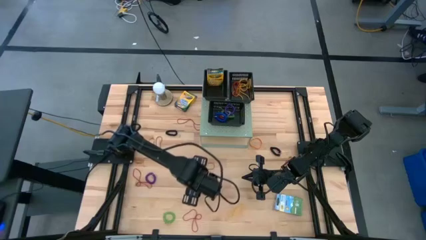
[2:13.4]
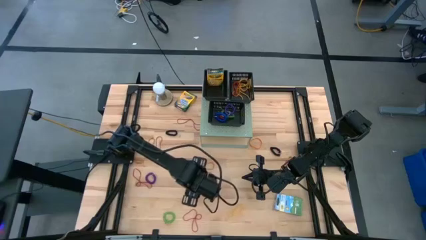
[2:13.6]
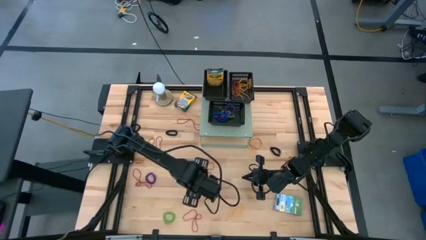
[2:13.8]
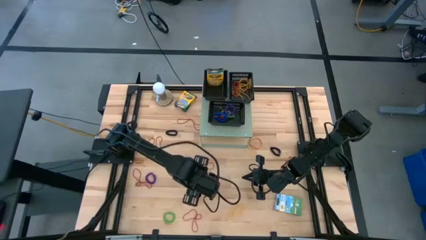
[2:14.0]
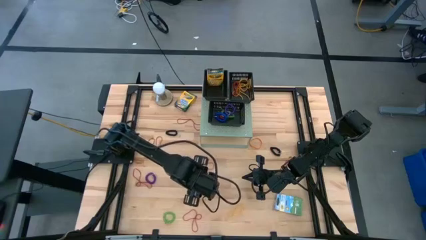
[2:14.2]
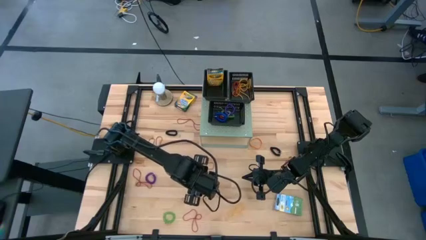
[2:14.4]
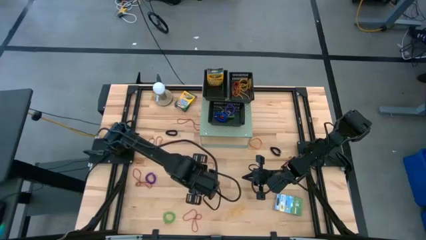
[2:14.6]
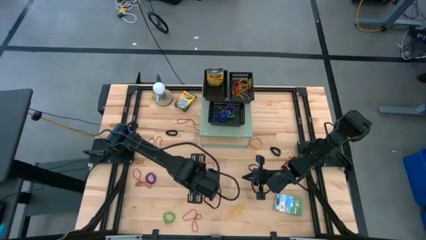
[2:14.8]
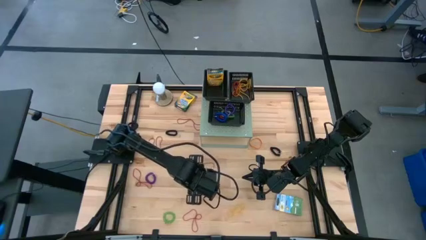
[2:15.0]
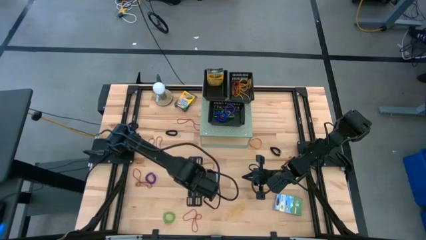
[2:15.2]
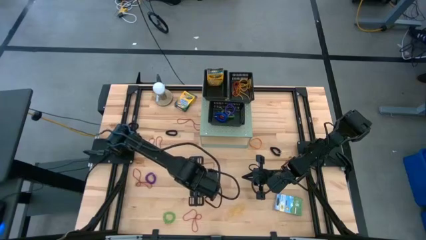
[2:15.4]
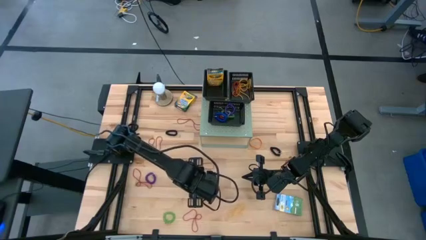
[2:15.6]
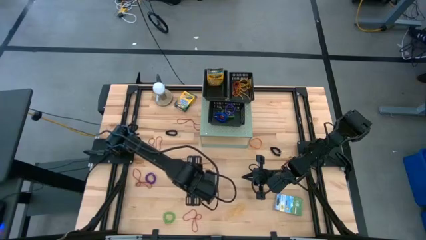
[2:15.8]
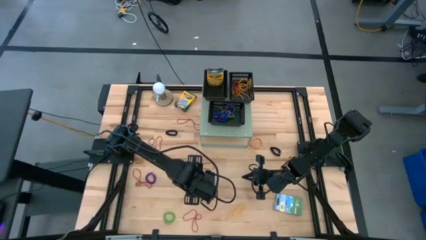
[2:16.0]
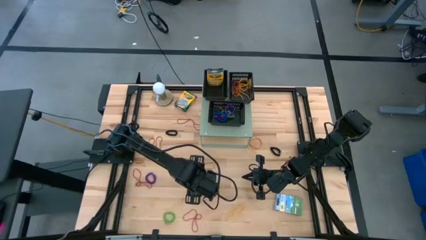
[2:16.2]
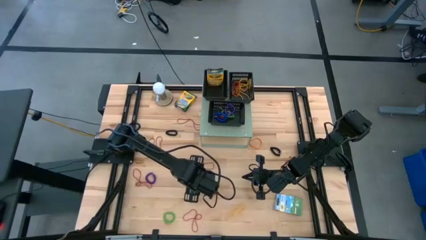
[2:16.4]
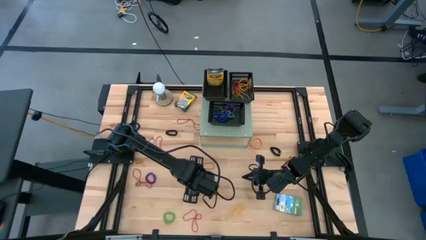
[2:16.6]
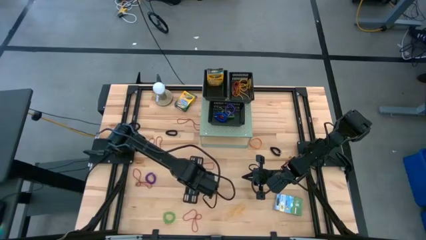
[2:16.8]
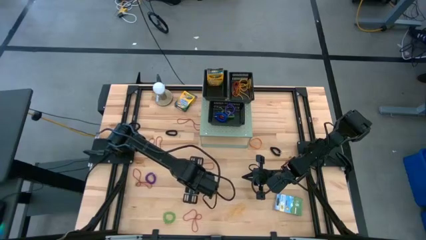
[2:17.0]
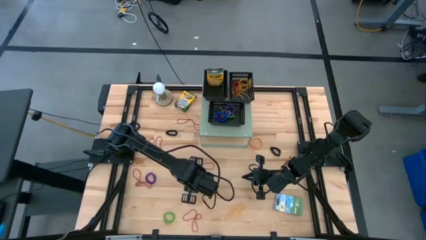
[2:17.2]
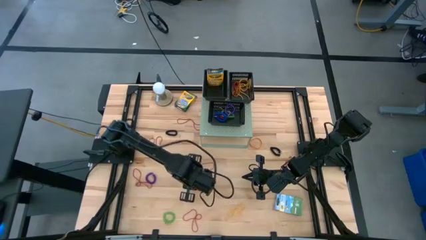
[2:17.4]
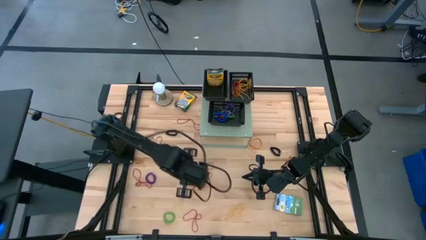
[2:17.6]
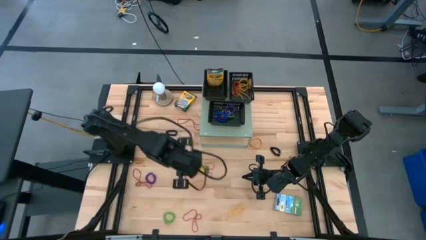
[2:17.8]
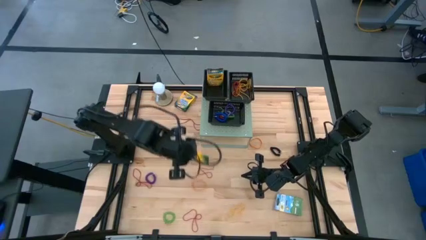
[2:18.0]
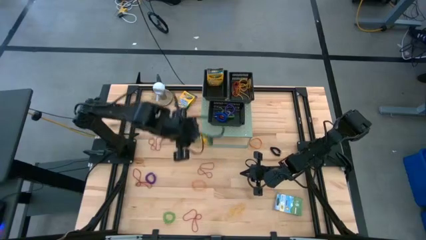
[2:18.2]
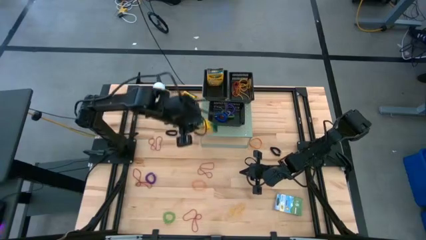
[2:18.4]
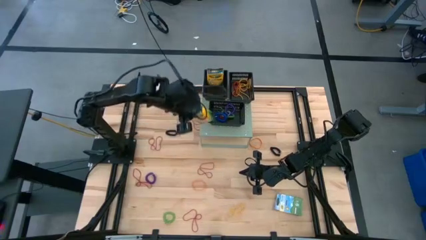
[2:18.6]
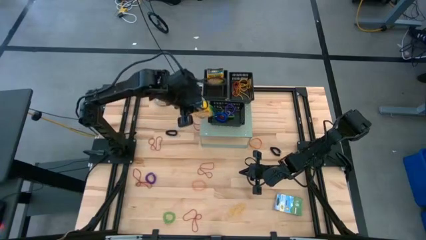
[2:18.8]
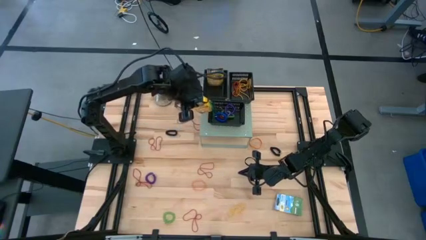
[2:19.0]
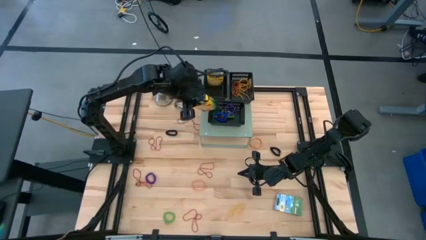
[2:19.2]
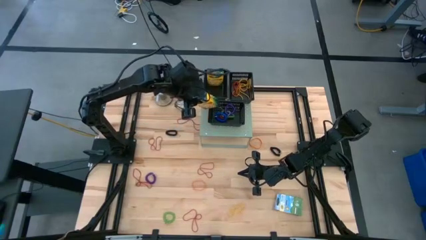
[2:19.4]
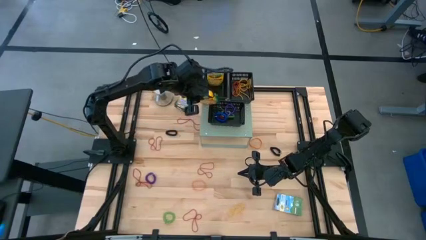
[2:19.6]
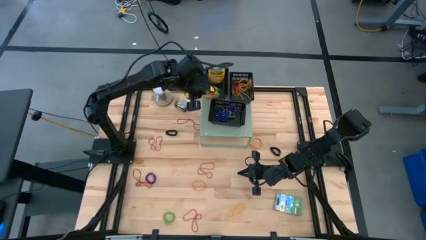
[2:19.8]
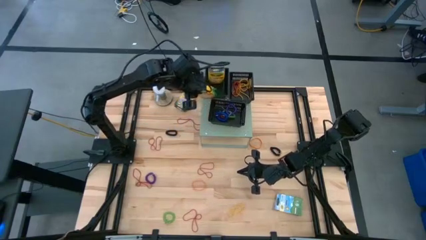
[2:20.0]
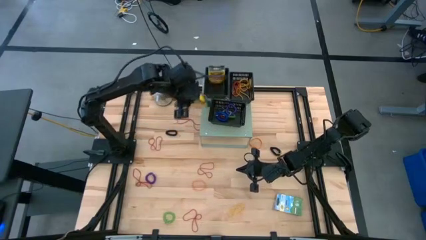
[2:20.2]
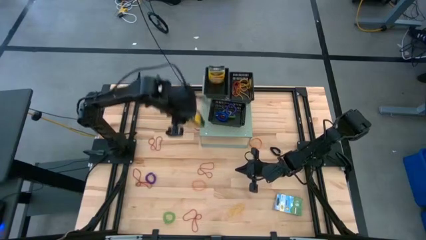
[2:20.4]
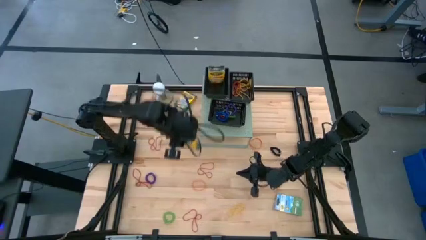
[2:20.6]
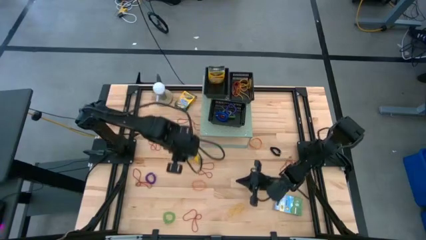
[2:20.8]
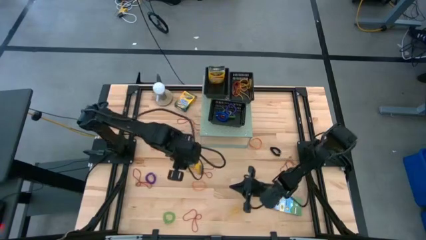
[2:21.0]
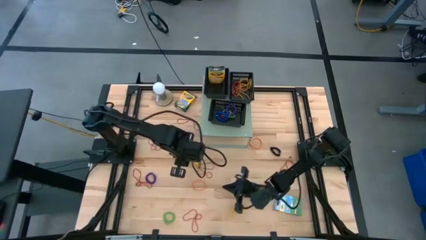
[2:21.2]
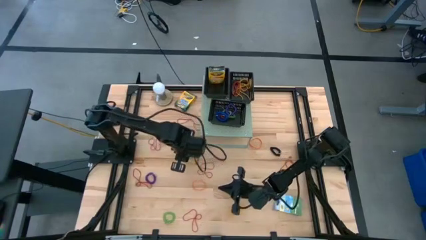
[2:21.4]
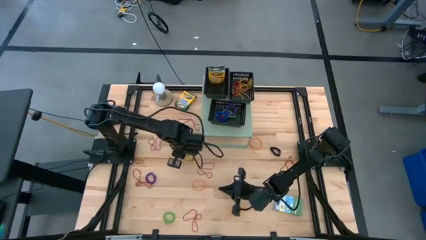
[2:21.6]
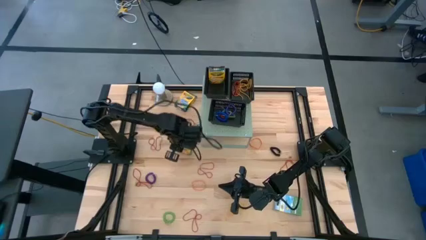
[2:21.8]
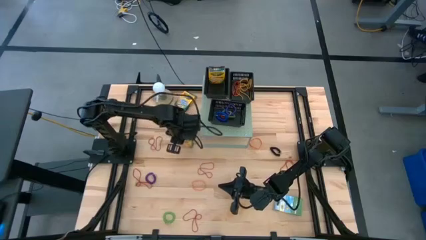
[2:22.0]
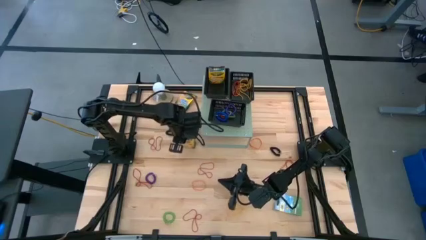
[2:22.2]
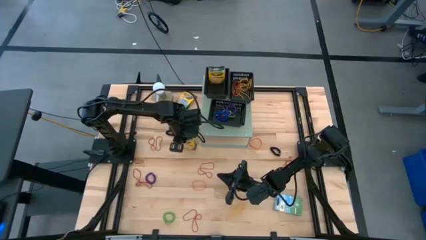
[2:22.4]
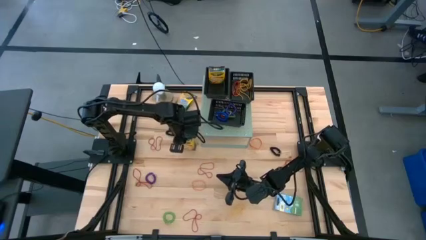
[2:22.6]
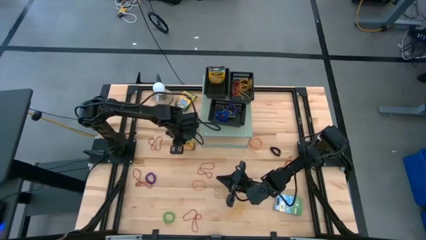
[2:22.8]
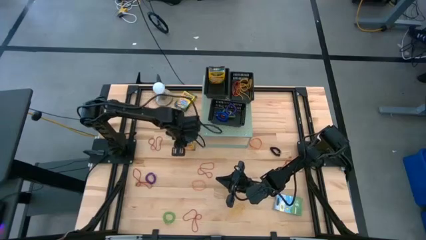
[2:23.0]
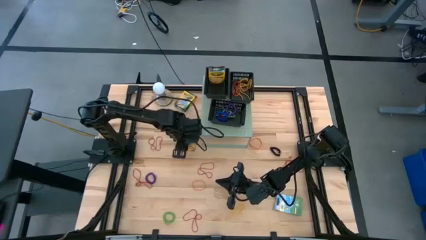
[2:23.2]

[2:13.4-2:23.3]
Task: Pick & Place Office Desk Supplies
Put the yellow crayon box into the top left black bin on the shelf

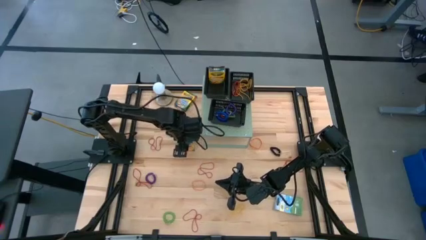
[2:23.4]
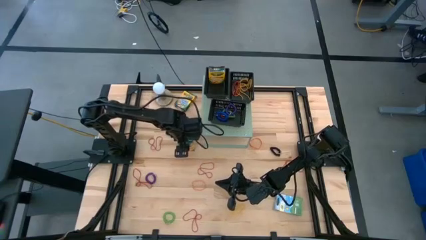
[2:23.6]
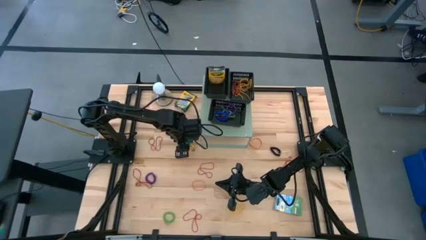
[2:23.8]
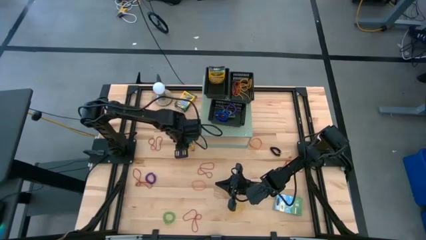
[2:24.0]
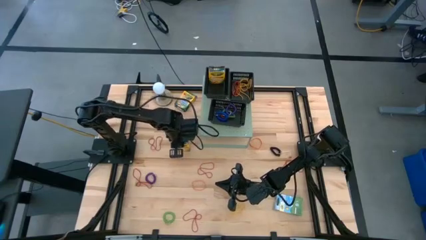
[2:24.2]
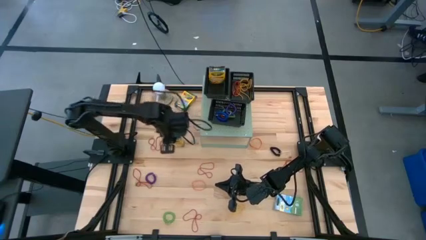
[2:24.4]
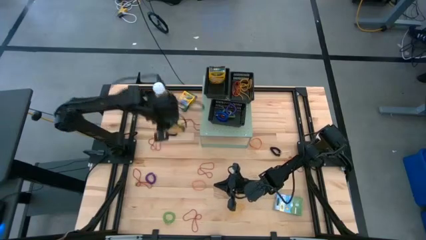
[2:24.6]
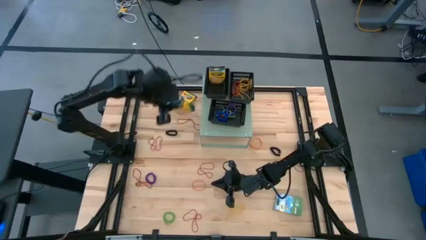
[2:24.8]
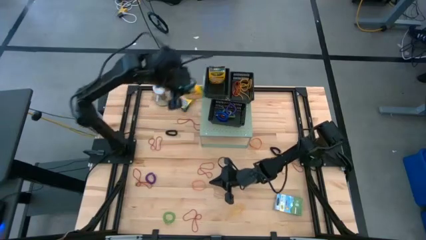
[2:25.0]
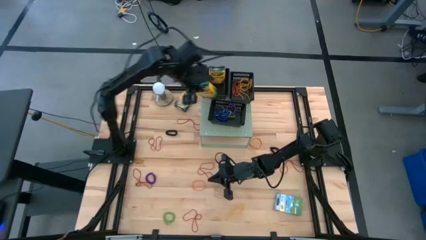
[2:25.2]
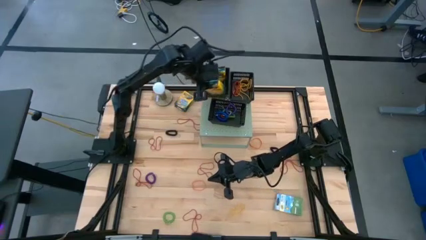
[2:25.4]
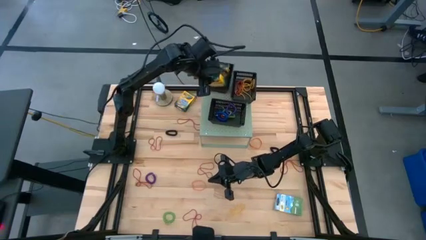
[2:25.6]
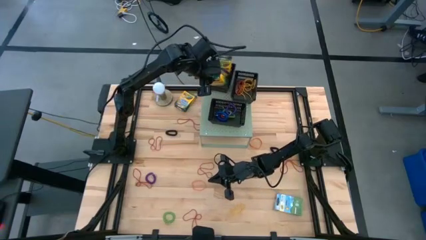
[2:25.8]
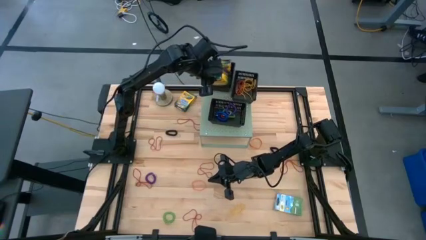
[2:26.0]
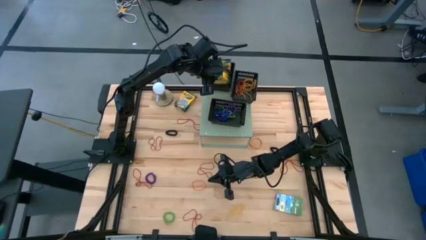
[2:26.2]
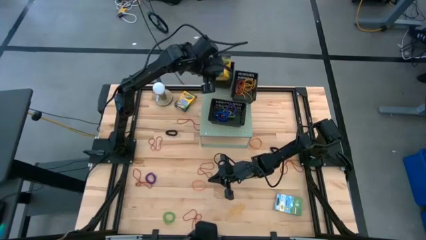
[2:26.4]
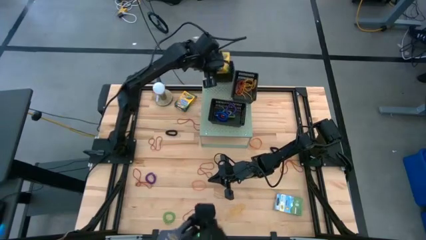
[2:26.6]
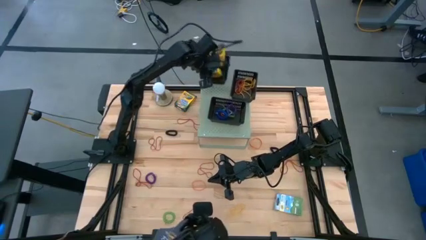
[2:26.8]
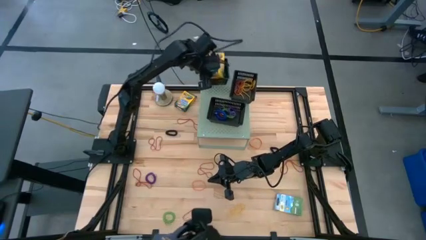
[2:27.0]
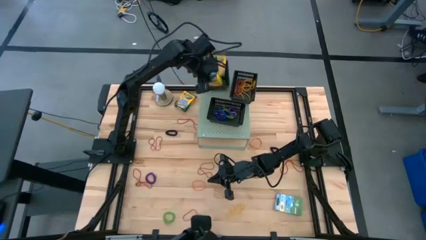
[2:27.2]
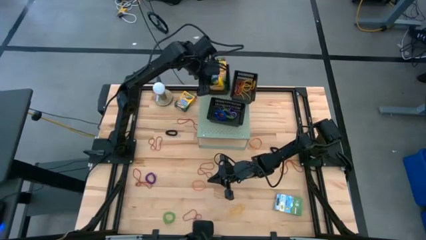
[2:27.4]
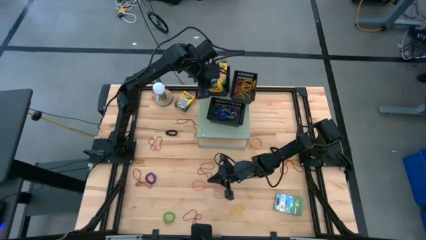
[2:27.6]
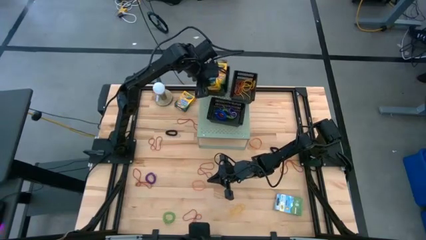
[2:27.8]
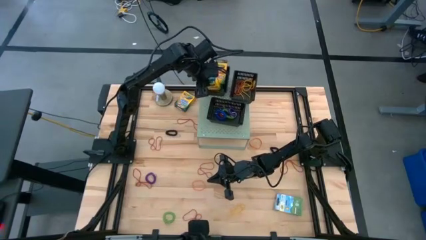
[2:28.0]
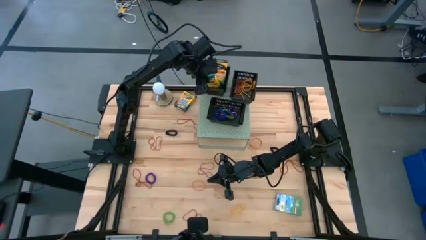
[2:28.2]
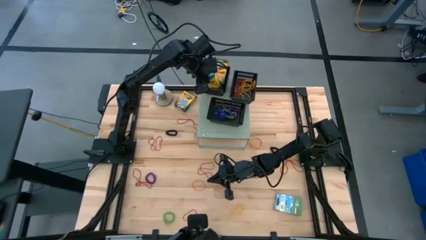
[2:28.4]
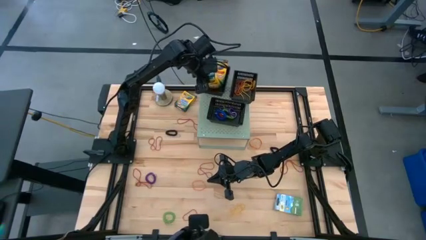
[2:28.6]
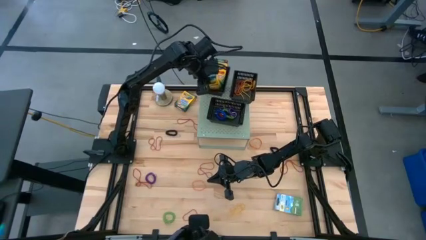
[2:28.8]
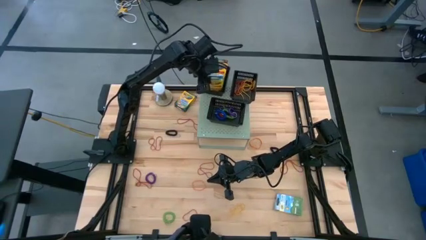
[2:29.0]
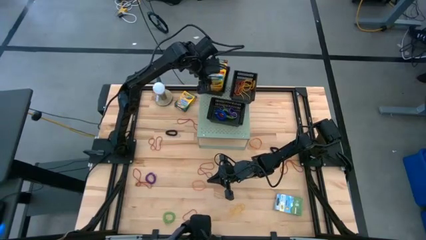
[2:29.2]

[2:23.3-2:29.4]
Put the yellow crayon box into the top left black bin on the shelf
